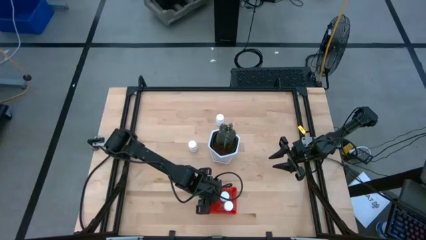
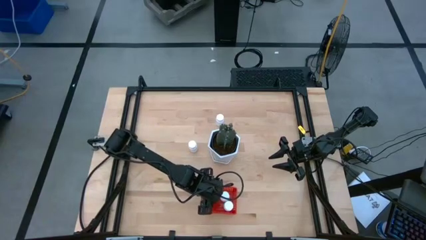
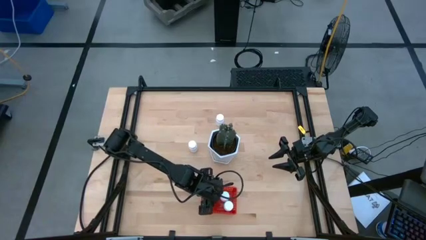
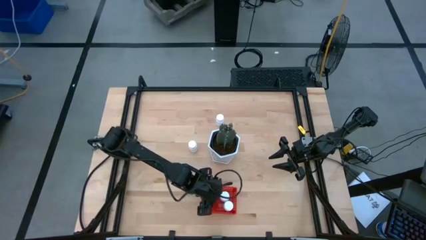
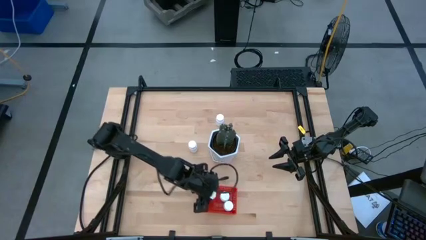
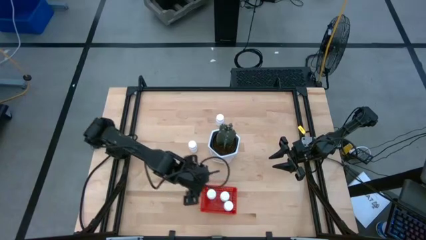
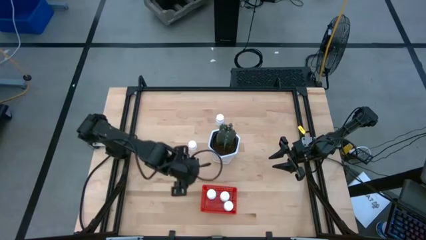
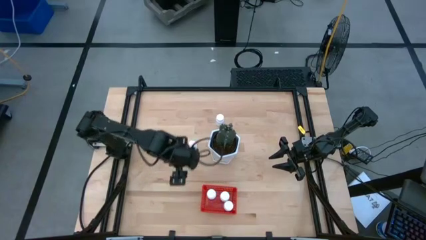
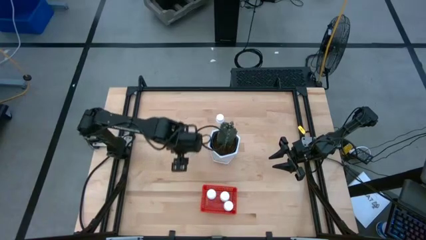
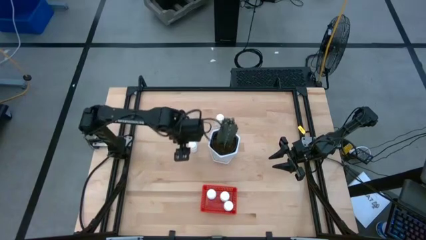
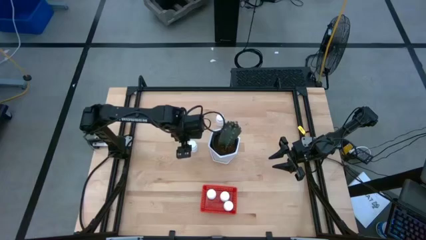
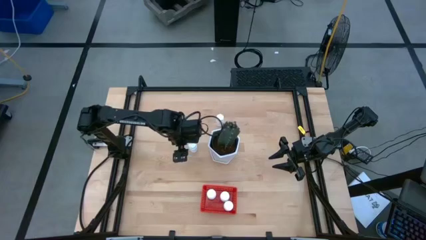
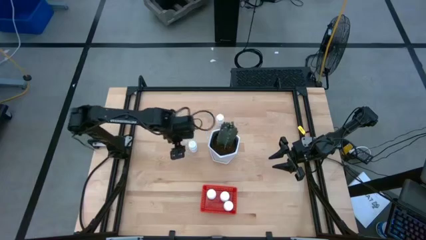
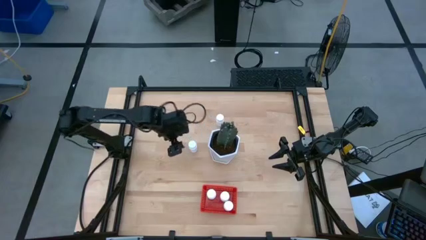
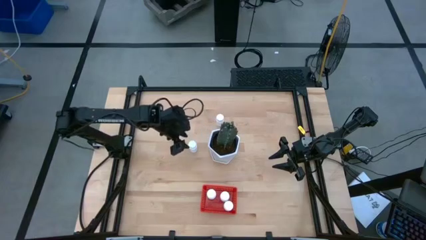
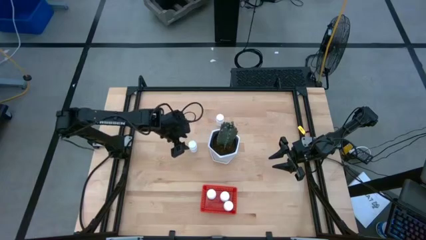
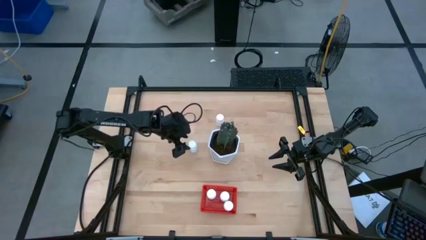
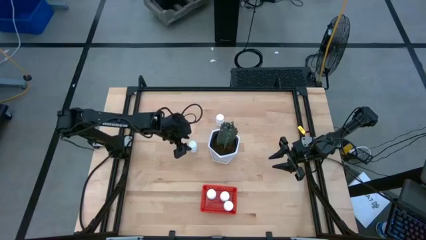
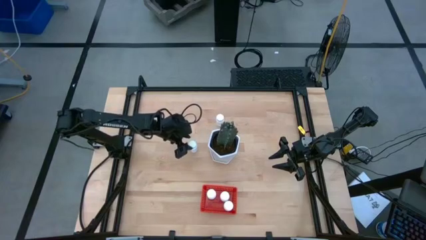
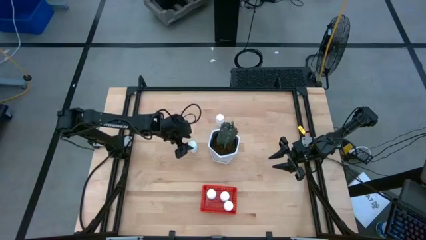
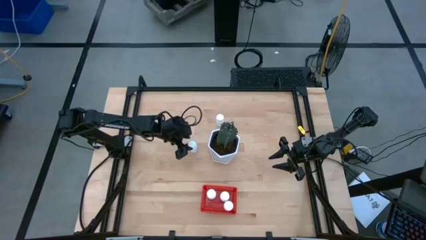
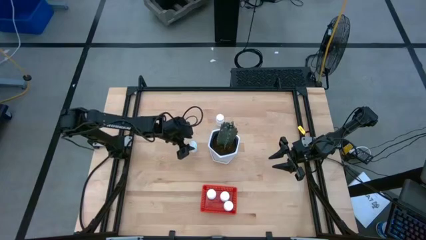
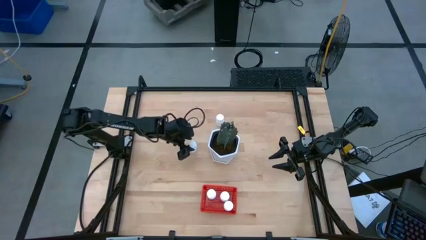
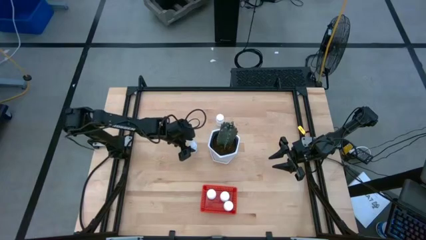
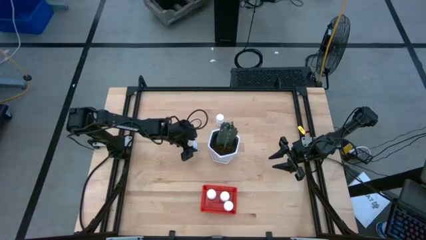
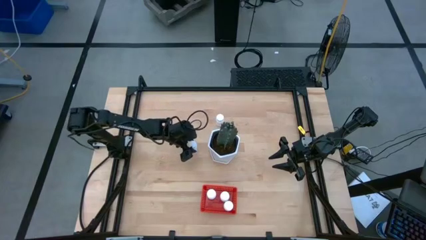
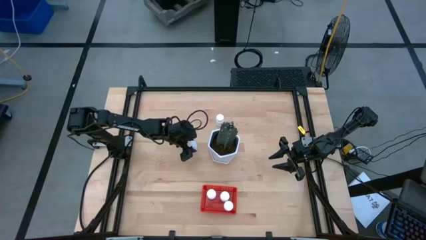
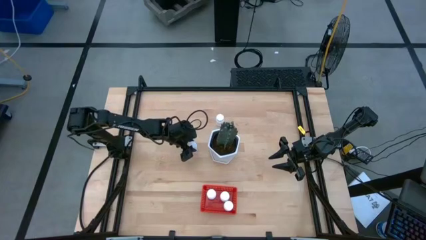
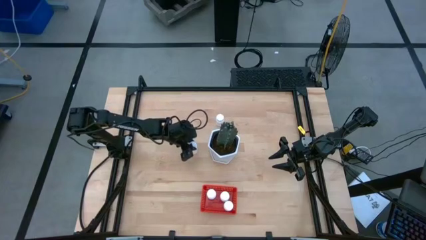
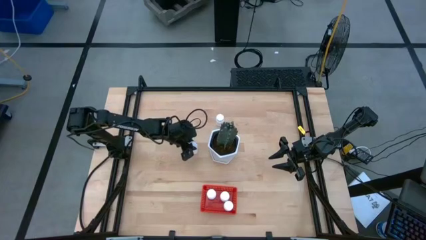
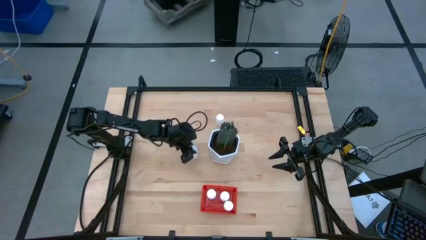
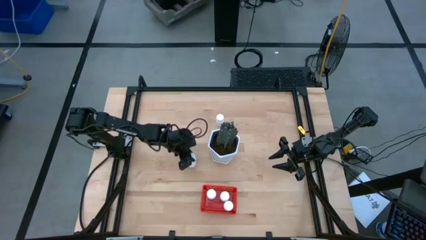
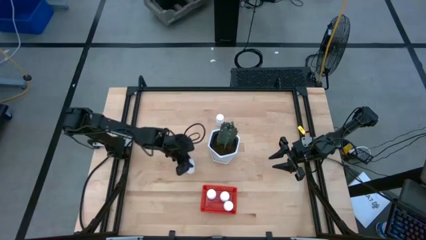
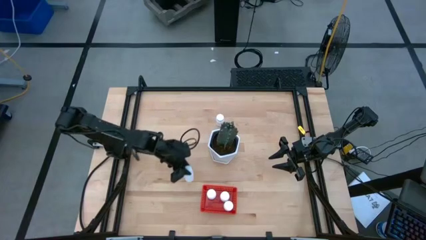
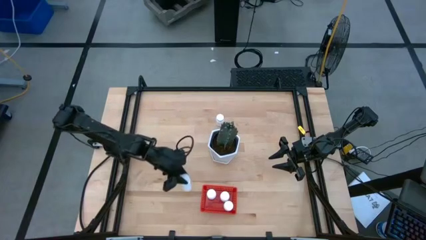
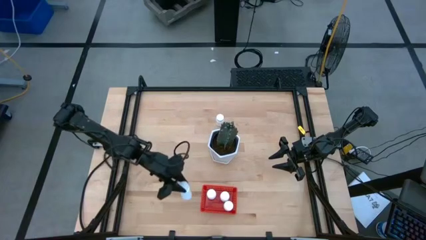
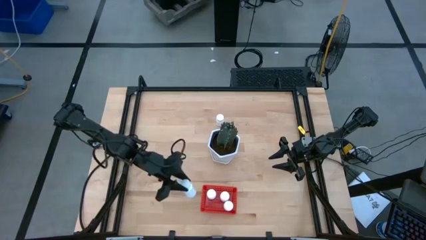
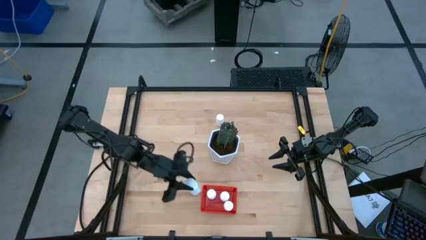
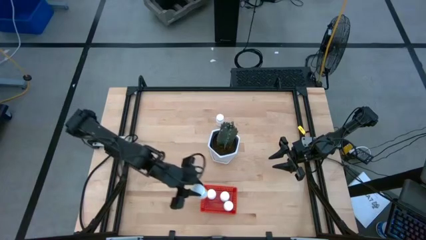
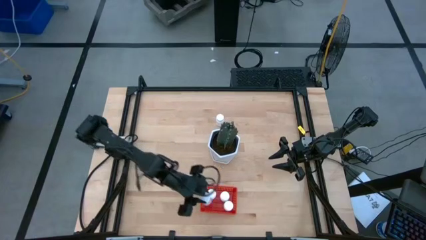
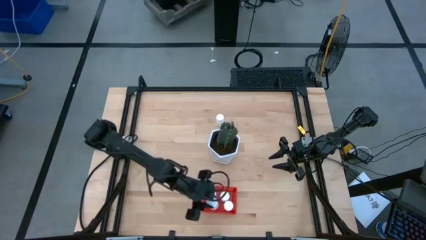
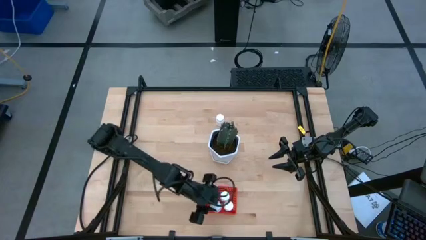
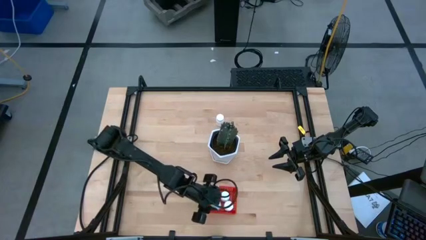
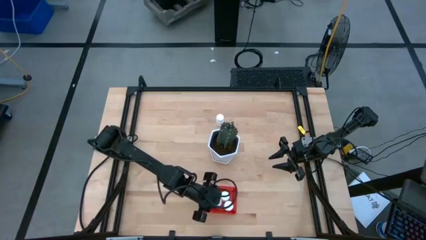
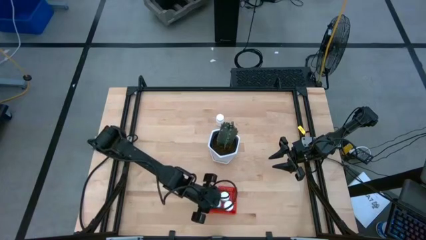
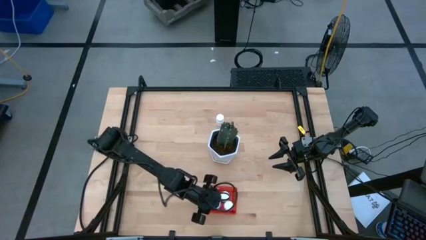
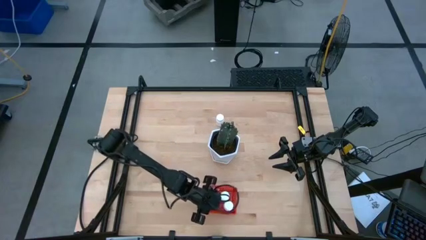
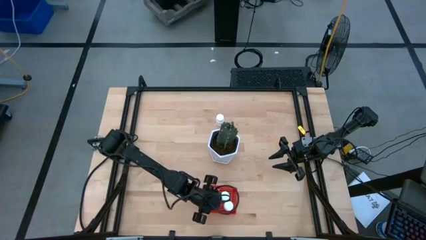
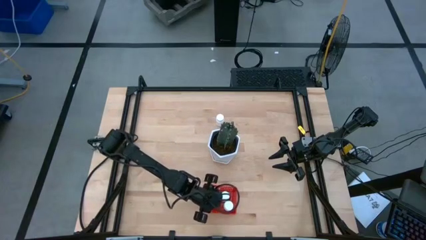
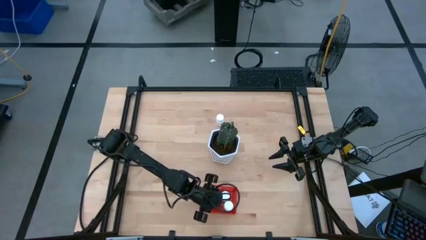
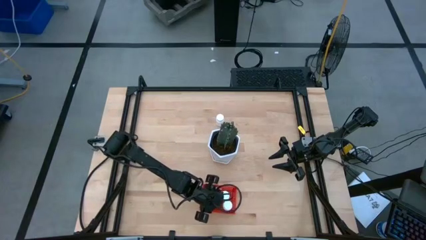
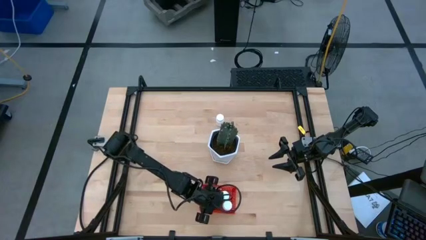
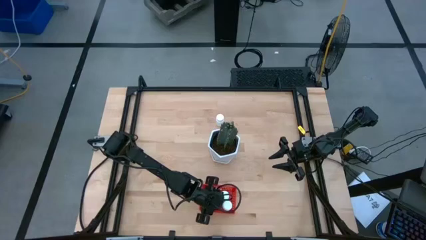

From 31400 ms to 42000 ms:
Task: Pick and place pill bottles into a basket
Put the white medicine bottle into the red bin
